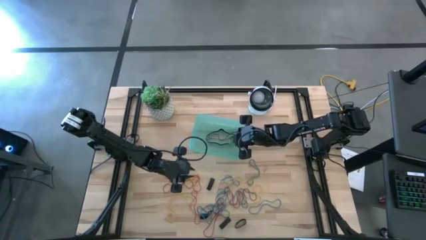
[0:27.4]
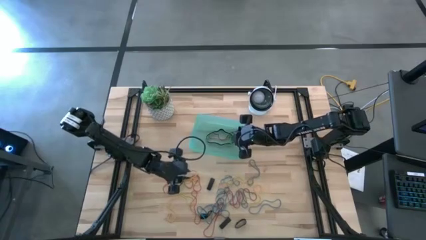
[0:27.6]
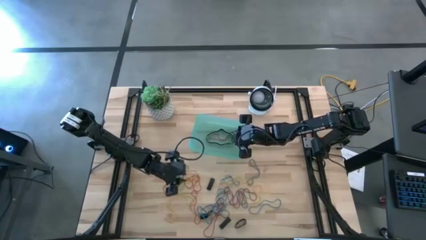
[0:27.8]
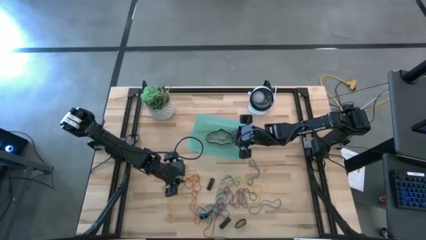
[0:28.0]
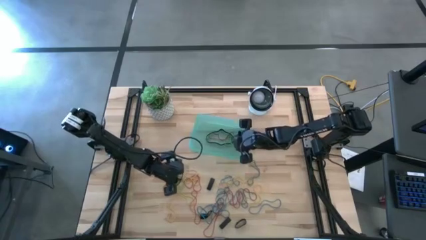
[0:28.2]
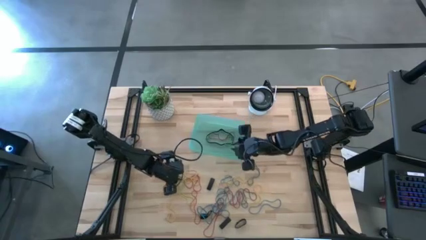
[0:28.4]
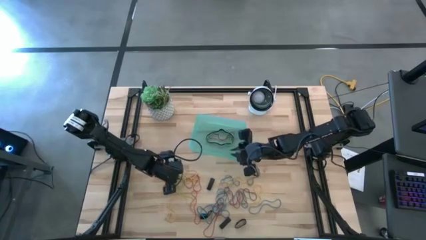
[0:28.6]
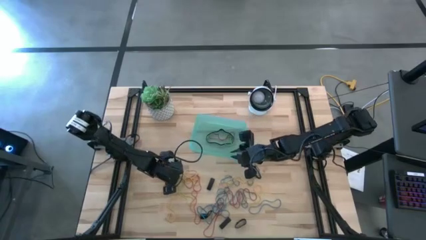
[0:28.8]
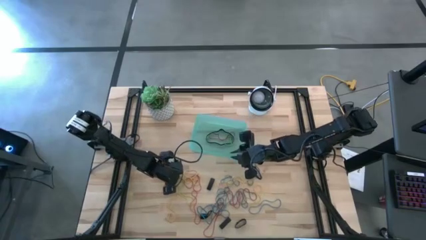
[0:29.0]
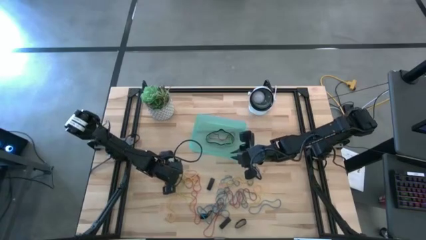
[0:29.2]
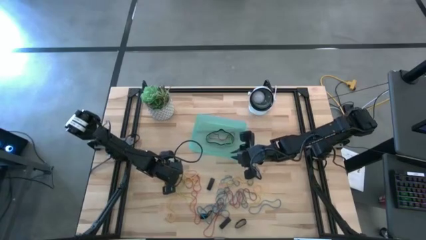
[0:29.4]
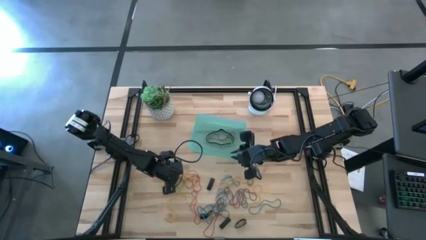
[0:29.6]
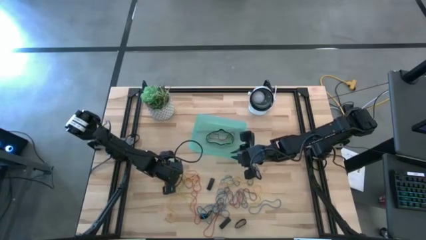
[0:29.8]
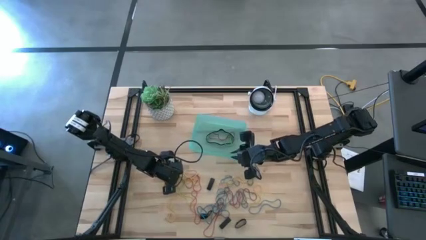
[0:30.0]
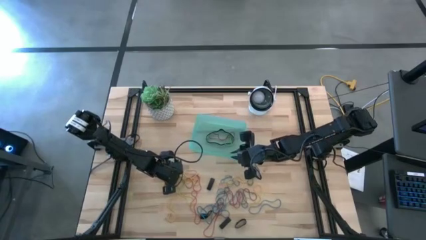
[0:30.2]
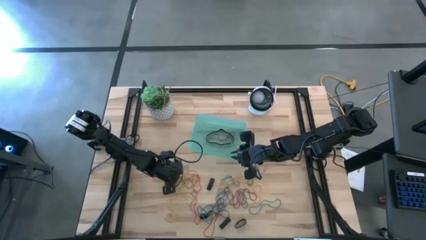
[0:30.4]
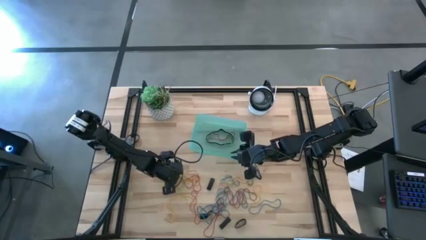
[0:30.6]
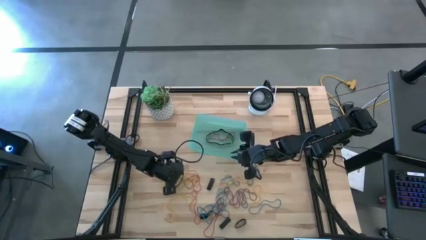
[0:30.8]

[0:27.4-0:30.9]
Task: Pick and place rubber bands into bin
Put the red rubber band into the green bin

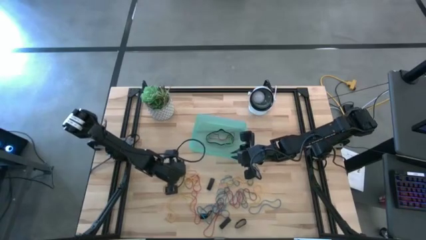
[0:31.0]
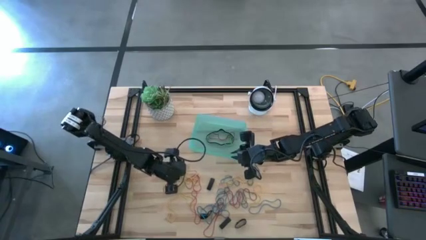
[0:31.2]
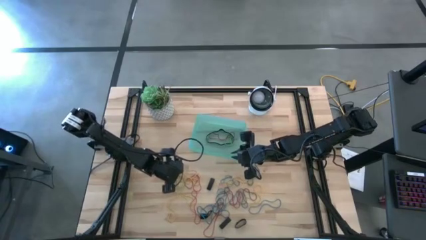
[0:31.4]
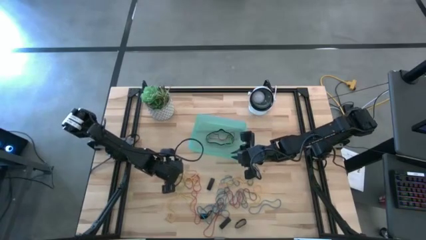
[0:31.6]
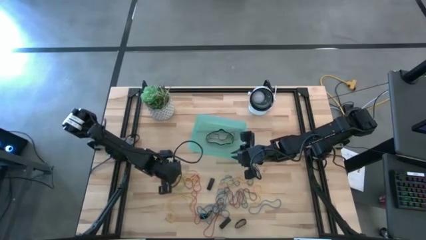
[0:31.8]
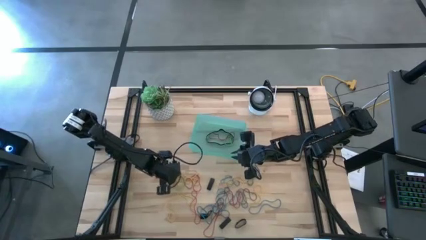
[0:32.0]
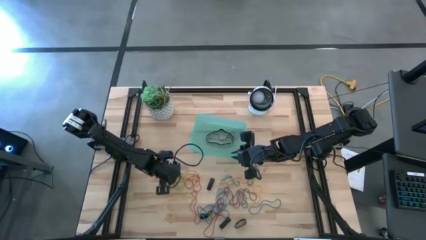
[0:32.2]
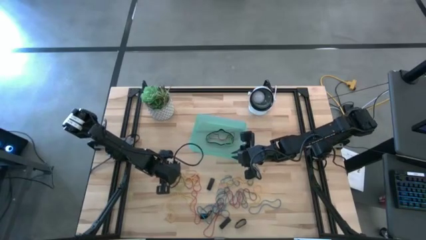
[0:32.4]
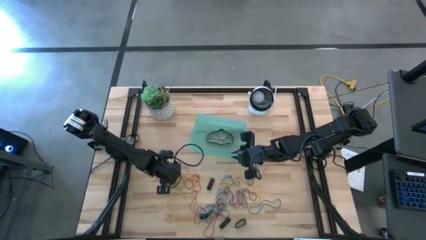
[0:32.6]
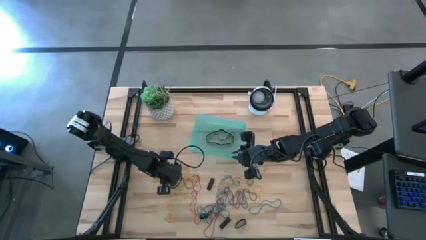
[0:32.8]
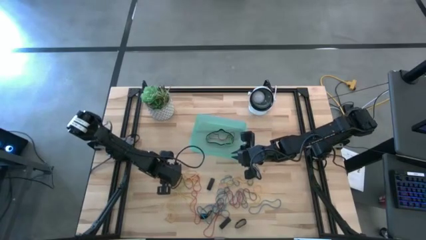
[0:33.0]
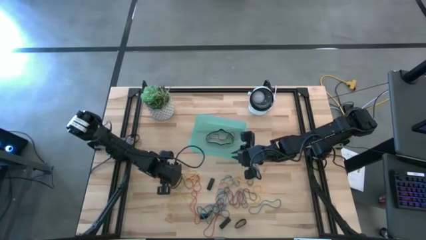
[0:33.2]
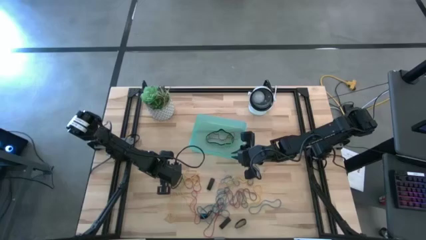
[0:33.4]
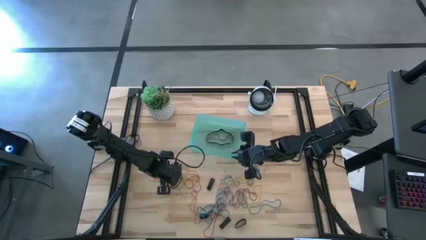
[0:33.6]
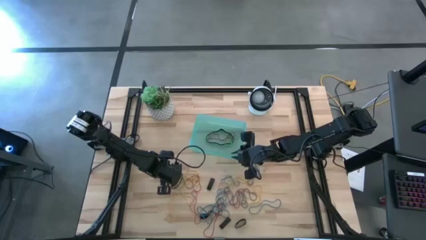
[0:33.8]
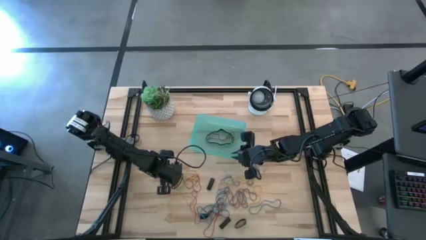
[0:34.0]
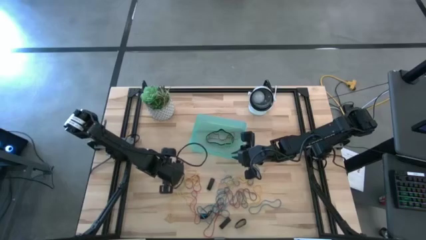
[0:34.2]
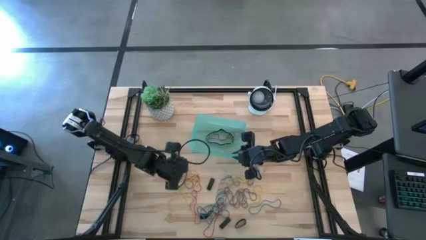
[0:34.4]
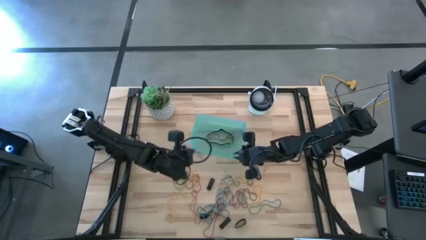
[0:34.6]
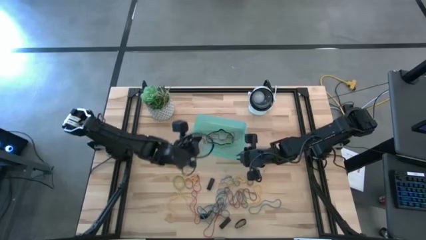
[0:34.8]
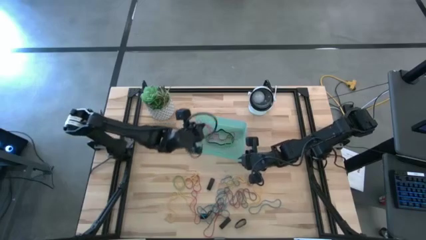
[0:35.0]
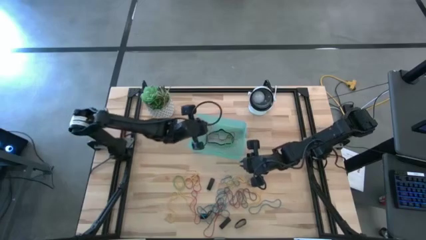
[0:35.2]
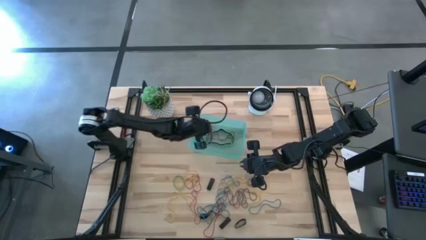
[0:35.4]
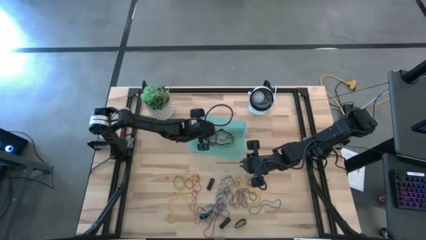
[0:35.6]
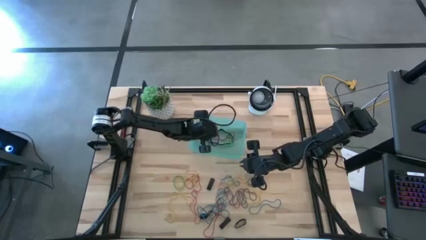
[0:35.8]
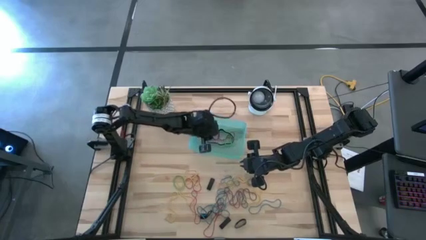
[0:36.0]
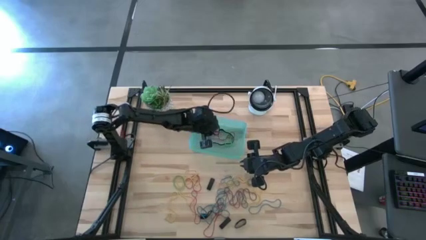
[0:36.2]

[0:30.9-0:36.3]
Put the red rubber band into the green bin

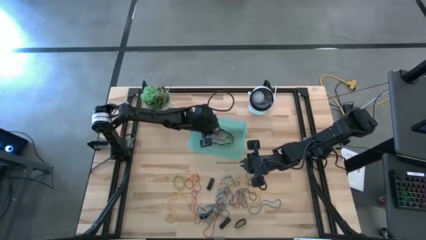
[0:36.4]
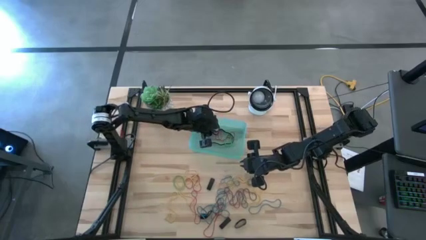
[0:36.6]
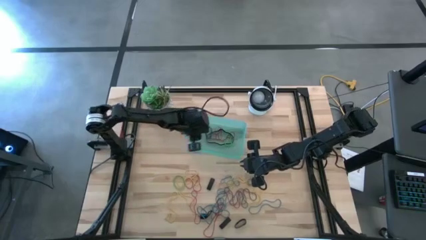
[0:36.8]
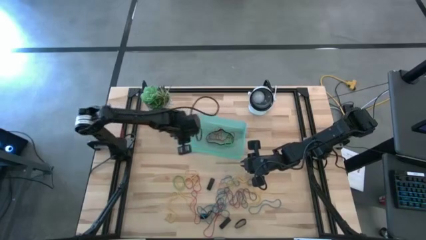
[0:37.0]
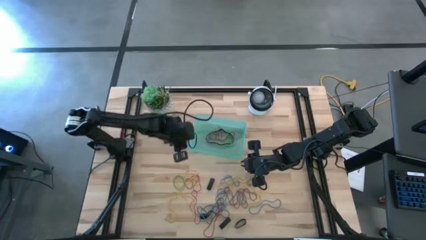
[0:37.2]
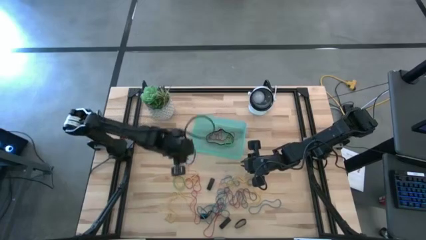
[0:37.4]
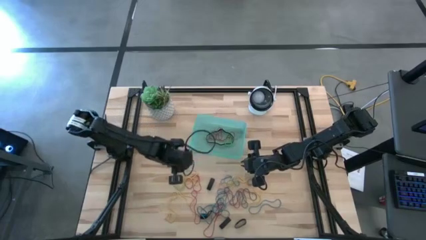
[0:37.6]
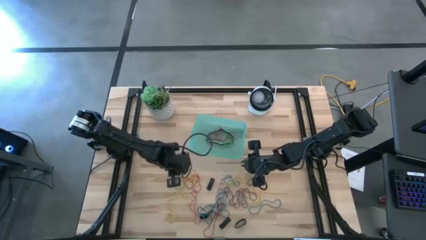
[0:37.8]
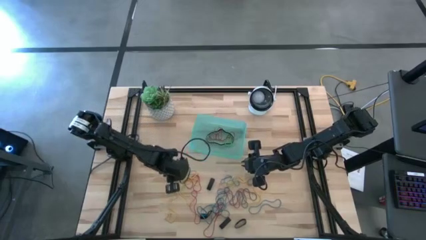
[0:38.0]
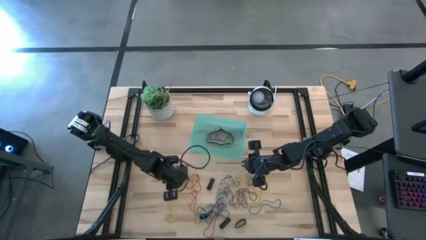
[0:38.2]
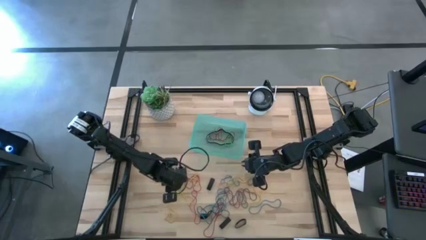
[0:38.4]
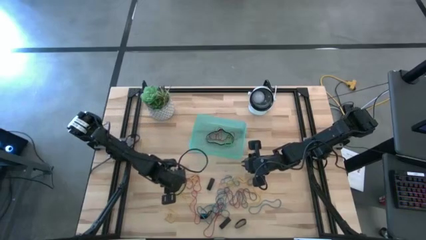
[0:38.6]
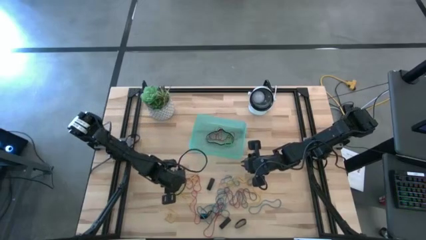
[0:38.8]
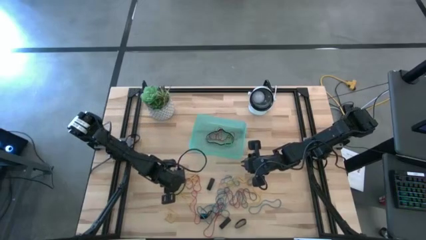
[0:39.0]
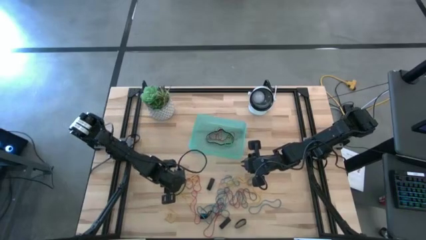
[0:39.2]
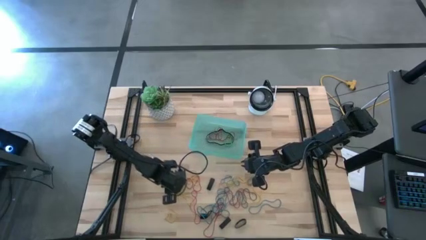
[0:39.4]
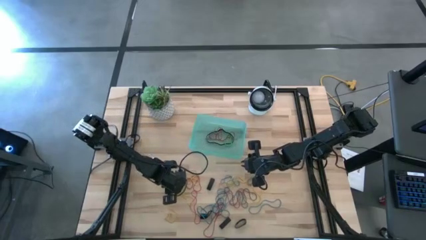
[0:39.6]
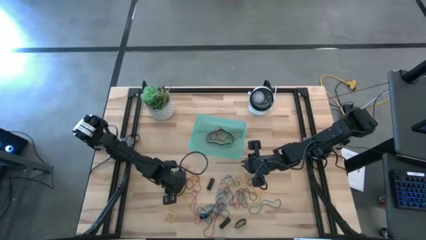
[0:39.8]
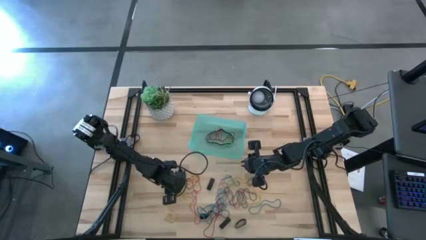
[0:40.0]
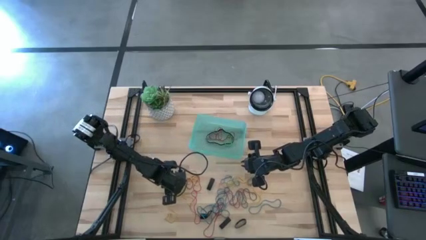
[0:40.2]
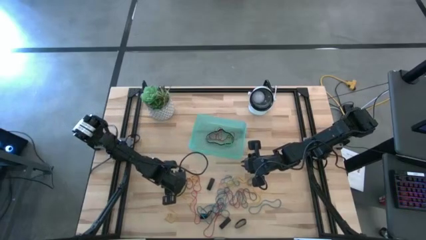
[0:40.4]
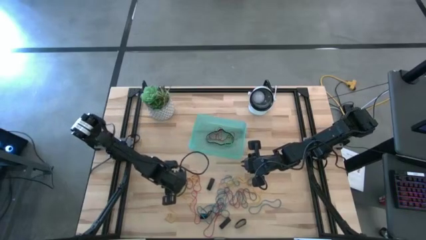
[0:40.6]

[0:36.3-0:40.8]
Put the green rubber band into the green bin

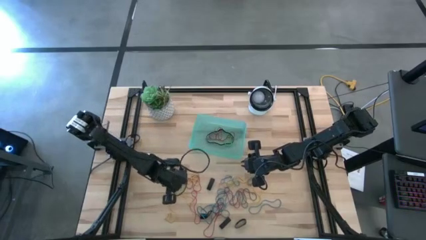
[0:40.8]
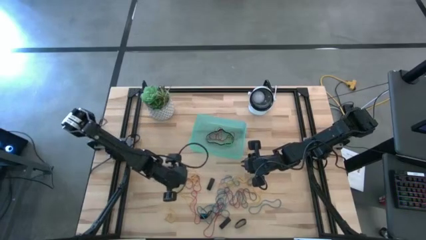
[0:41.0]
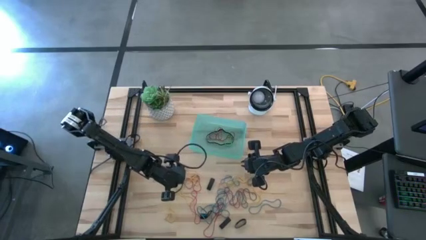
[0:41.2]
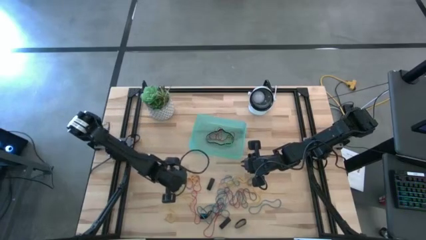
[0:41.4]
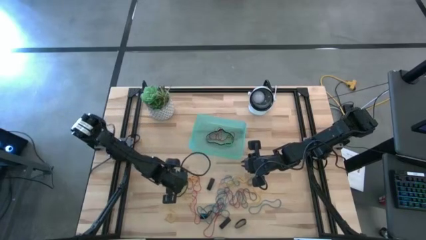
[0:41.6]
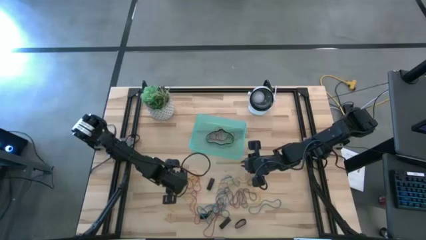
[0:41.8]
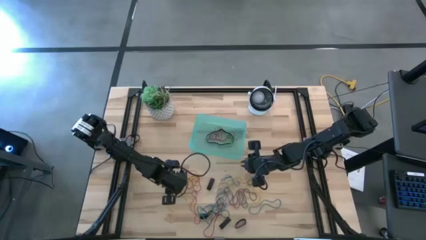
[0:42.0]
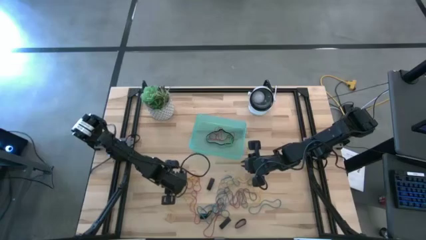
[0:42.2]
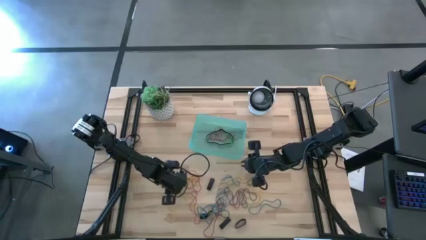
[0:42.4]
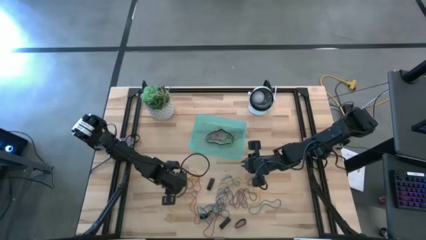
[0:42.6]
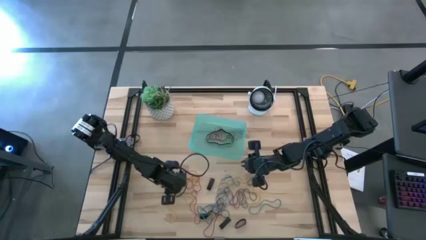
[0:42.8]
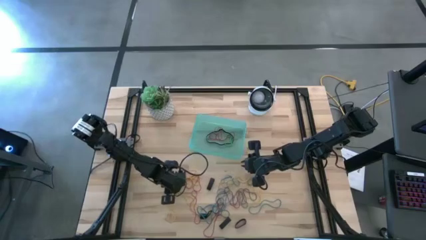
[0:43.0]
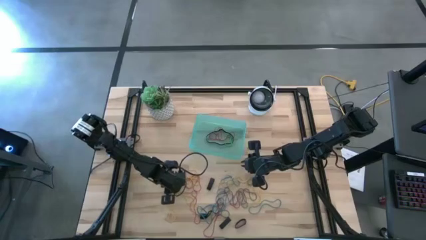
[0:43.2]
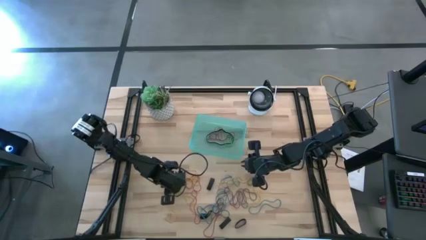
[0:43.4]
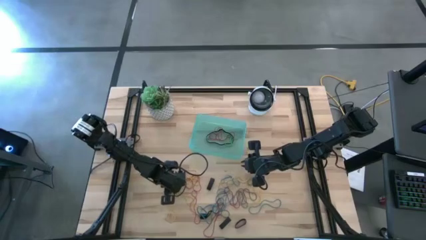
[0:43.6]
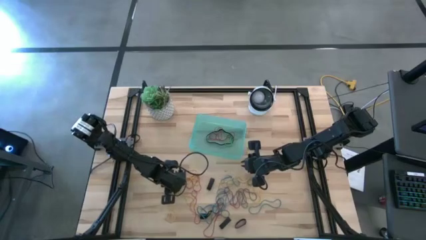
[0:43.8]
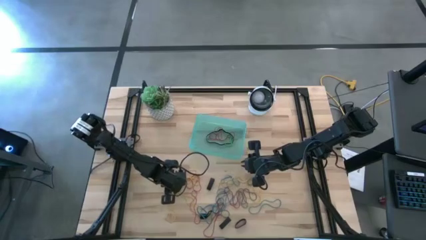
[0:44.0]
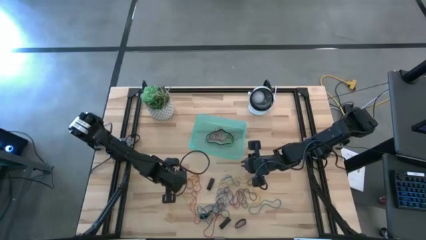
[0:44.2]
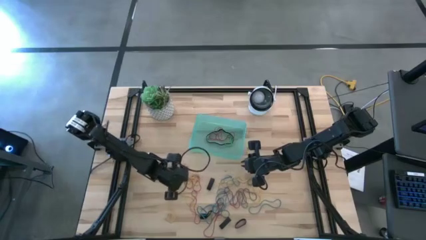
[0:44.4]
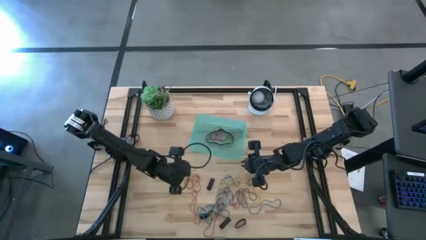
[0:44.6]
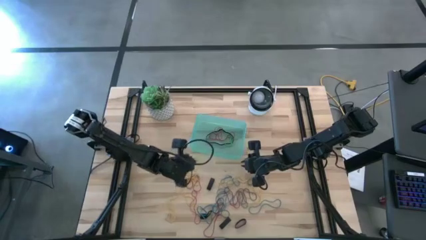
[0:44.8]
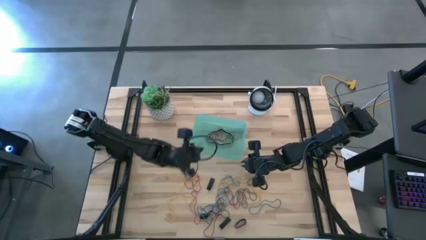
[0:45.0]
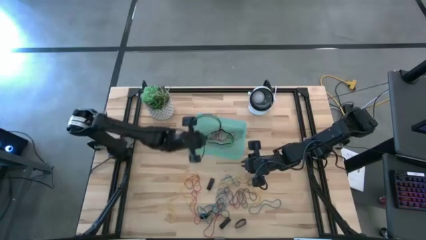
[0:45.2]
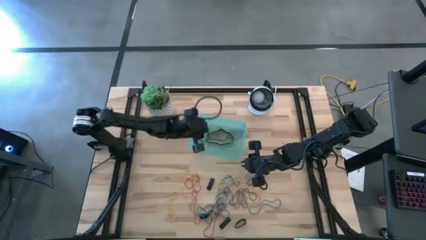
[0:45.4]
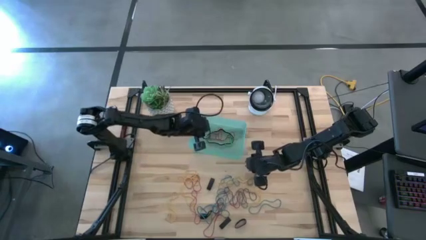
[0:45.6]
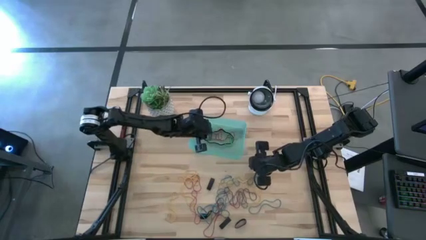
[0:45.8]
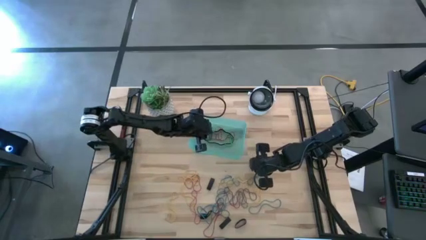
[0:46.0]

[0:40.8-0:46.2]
Put the green rubber band into the green bin
